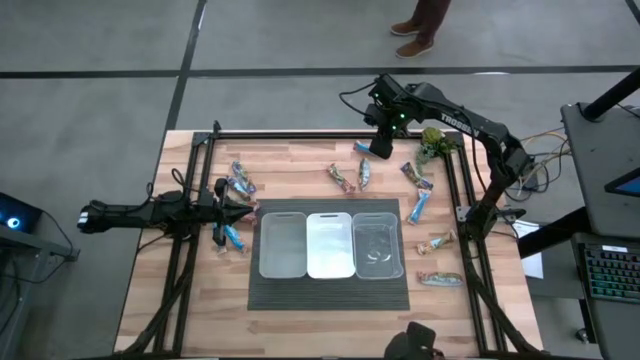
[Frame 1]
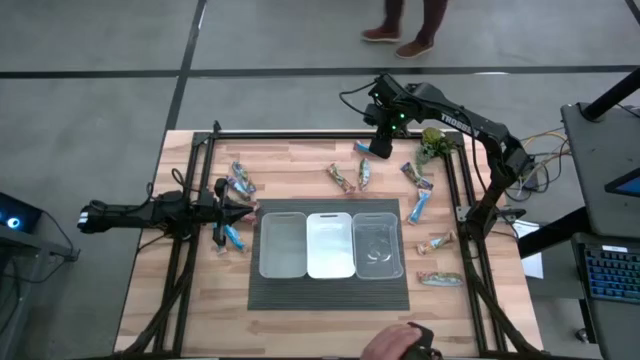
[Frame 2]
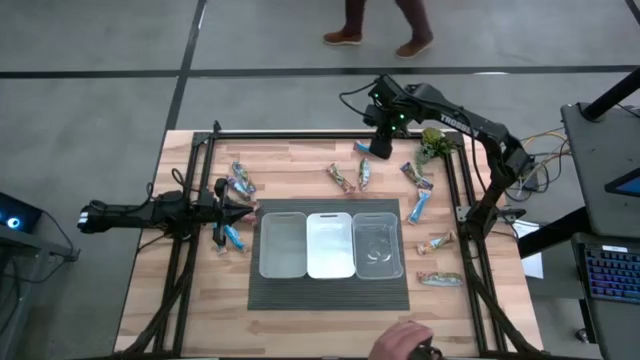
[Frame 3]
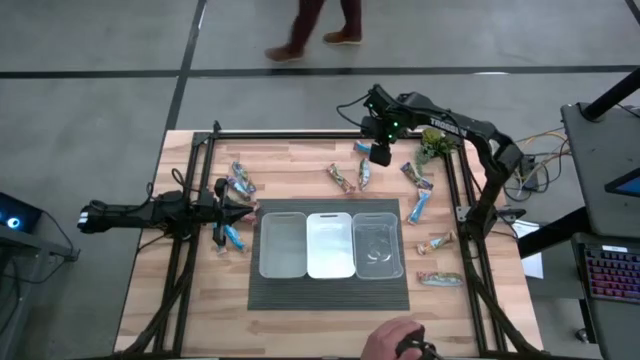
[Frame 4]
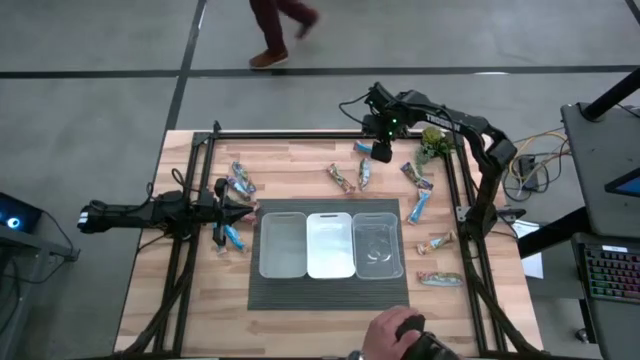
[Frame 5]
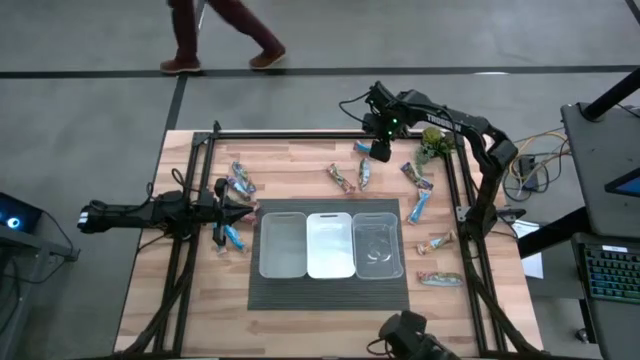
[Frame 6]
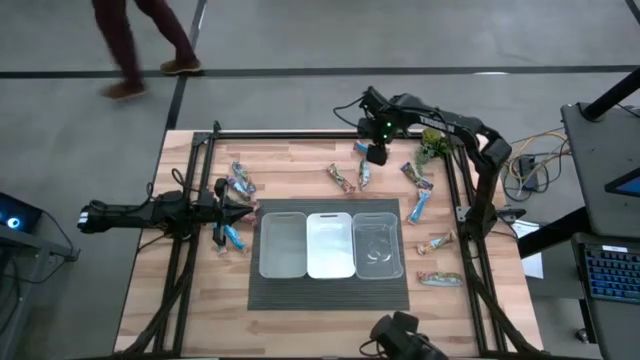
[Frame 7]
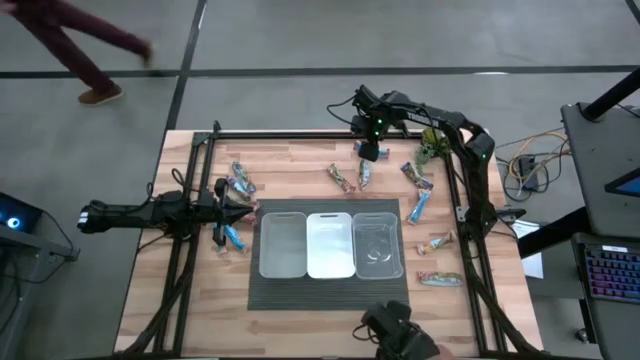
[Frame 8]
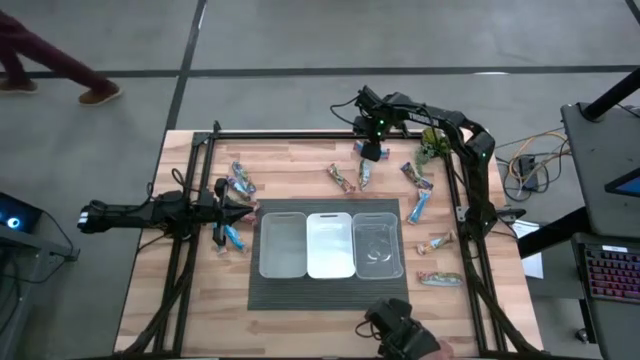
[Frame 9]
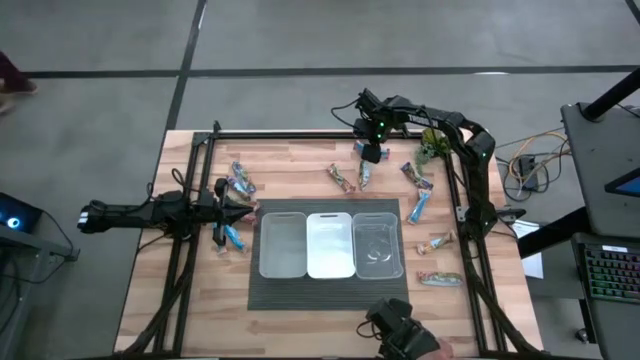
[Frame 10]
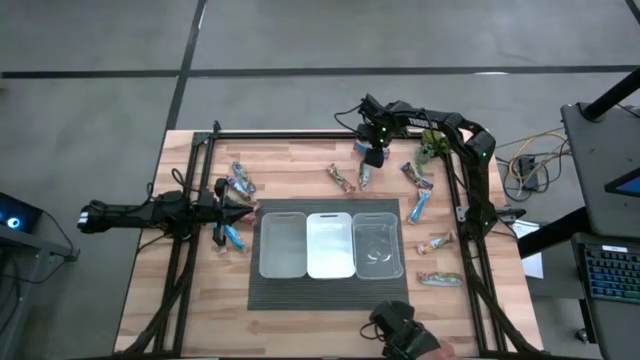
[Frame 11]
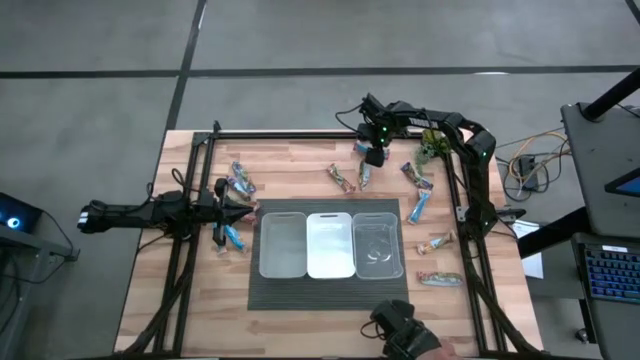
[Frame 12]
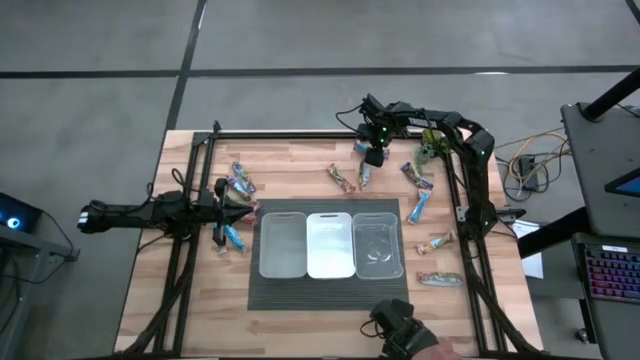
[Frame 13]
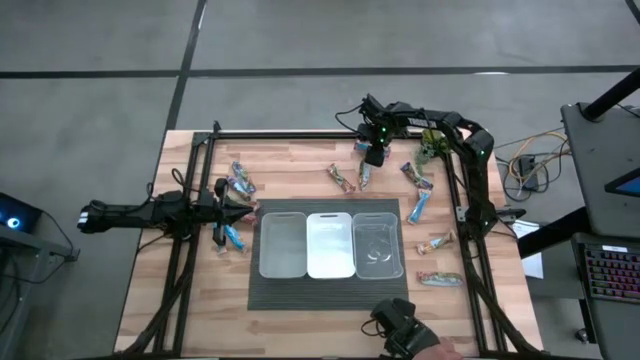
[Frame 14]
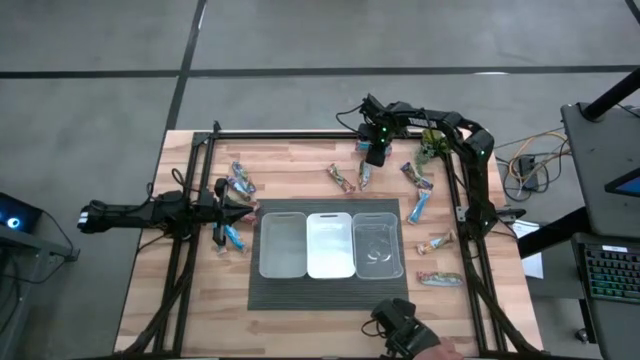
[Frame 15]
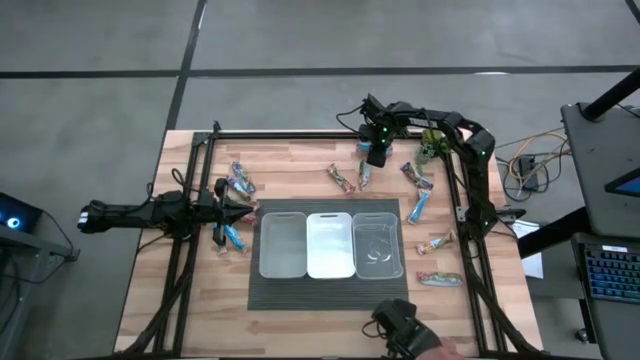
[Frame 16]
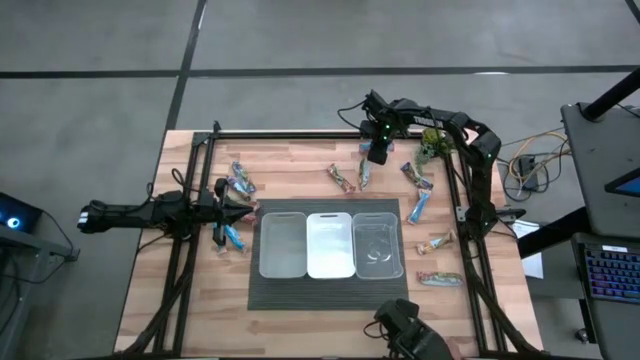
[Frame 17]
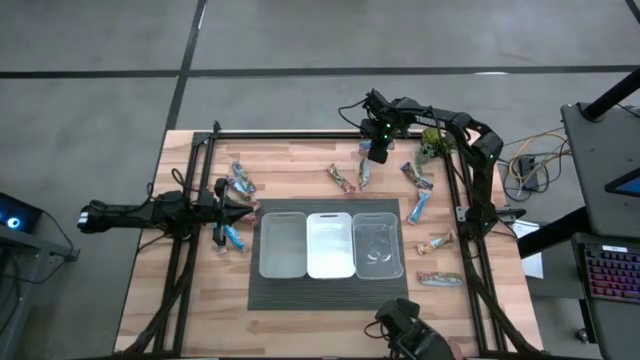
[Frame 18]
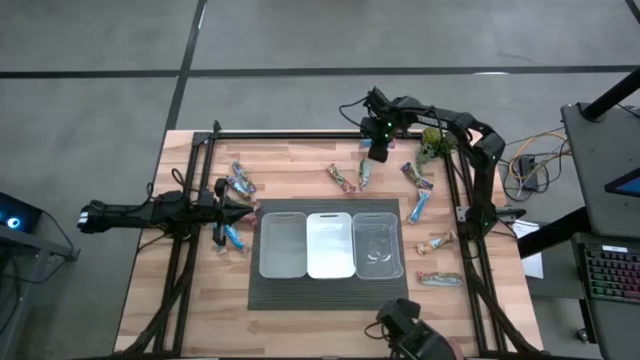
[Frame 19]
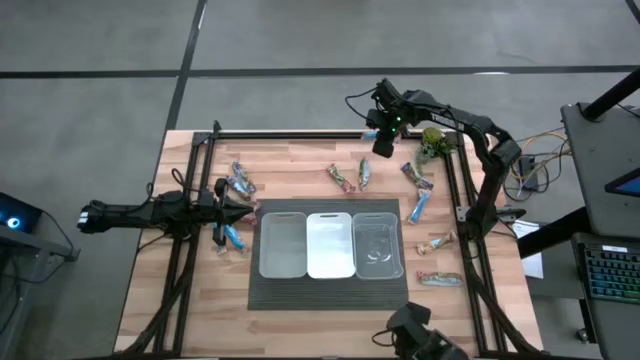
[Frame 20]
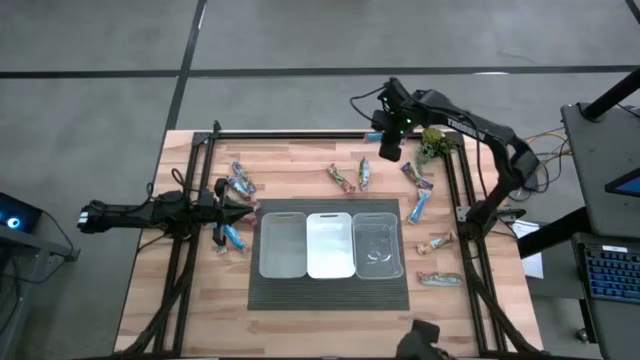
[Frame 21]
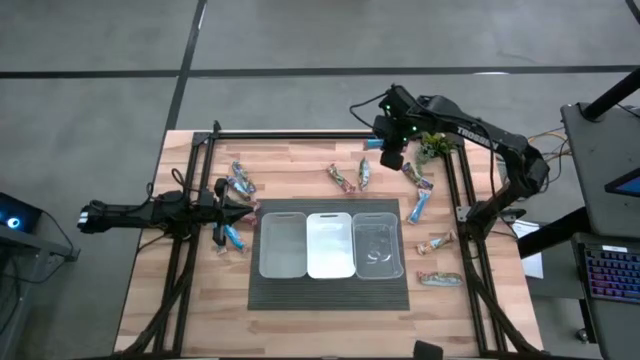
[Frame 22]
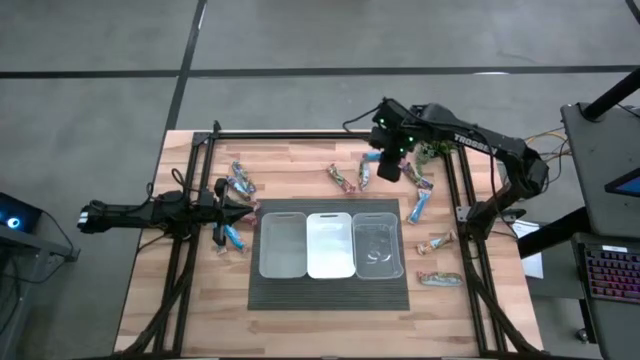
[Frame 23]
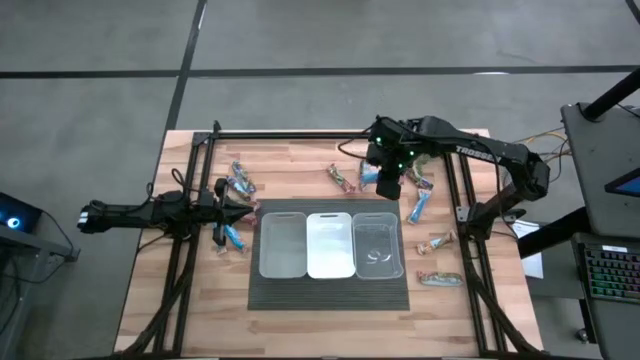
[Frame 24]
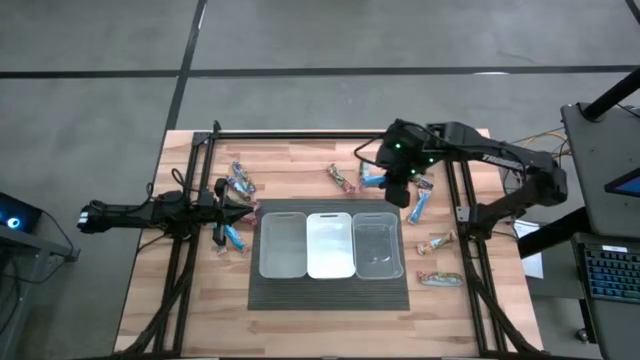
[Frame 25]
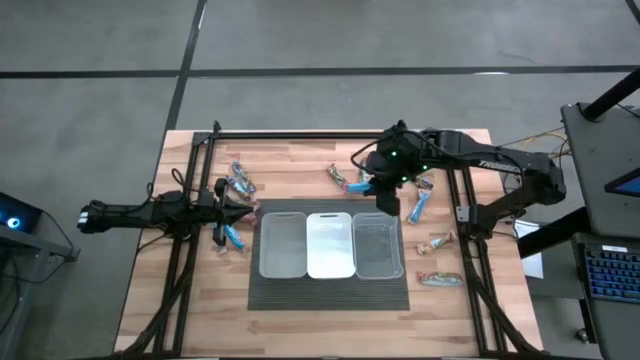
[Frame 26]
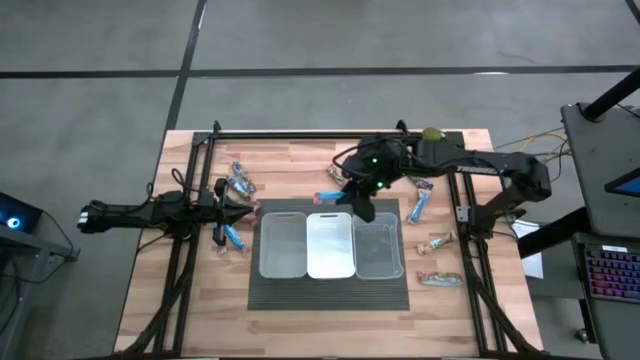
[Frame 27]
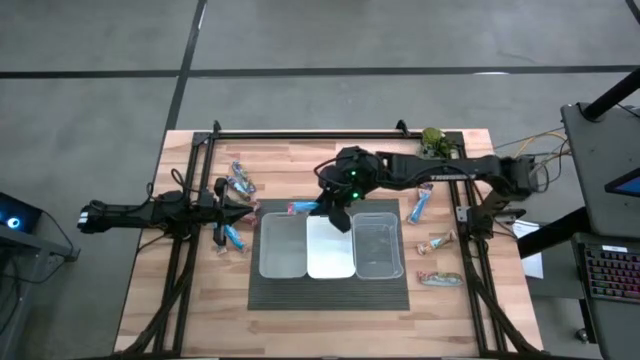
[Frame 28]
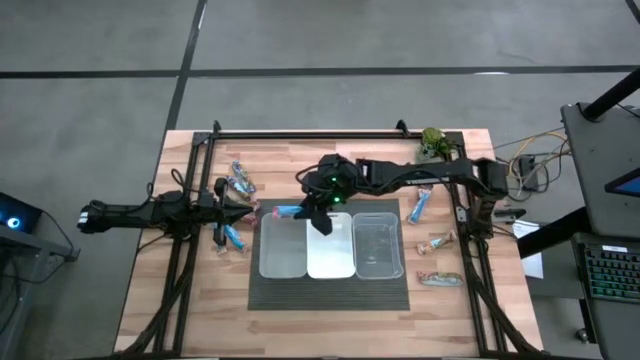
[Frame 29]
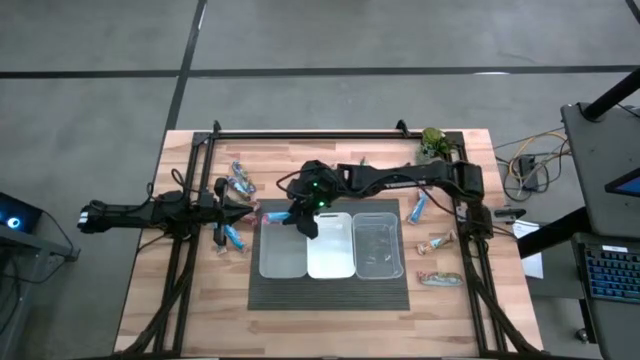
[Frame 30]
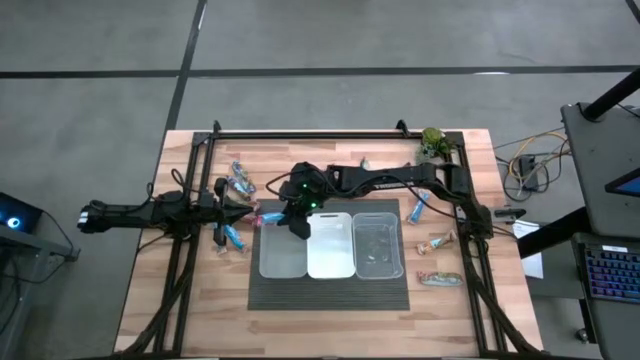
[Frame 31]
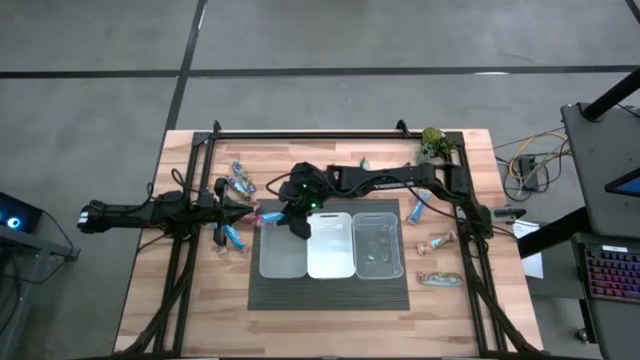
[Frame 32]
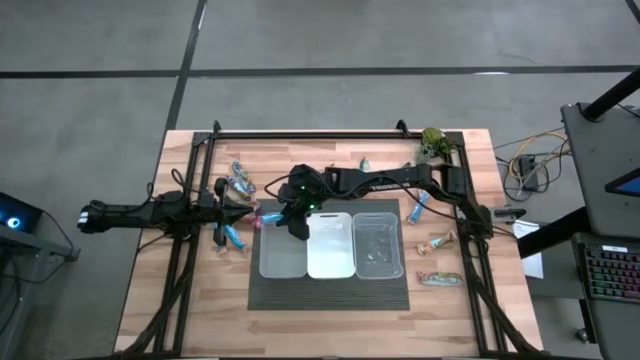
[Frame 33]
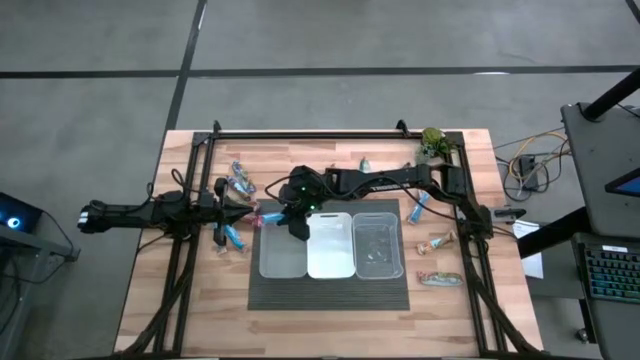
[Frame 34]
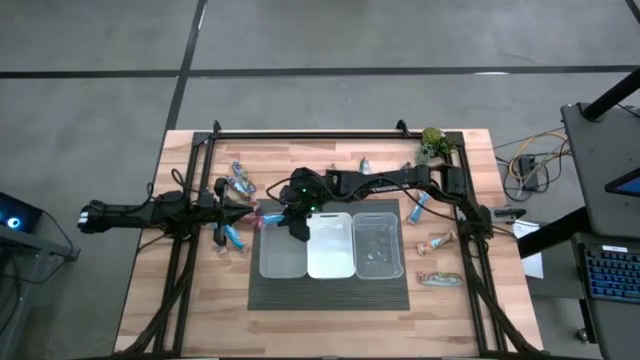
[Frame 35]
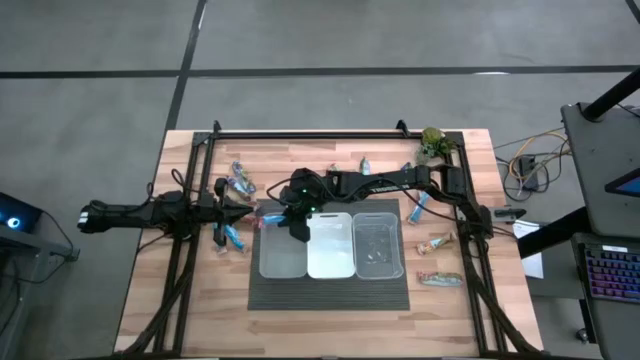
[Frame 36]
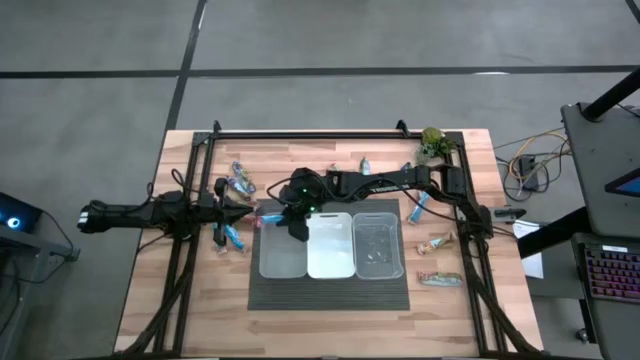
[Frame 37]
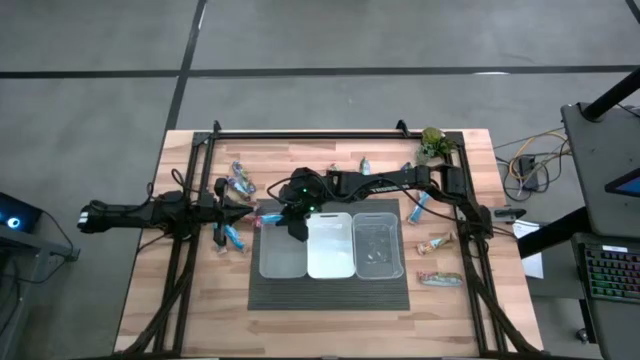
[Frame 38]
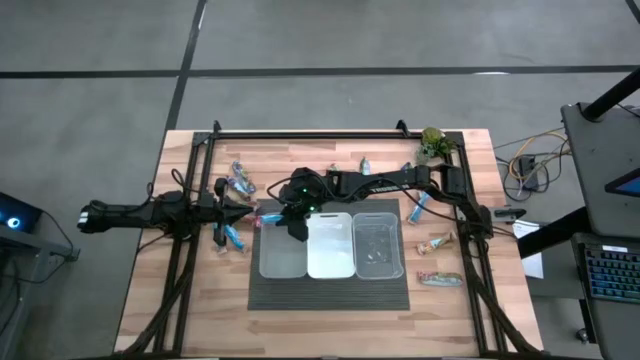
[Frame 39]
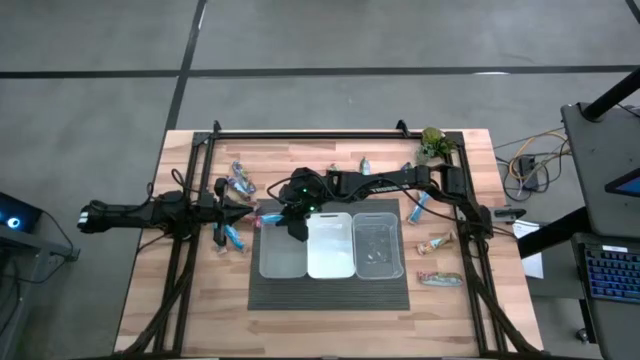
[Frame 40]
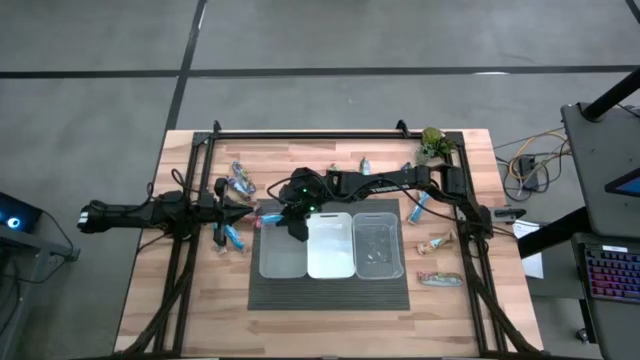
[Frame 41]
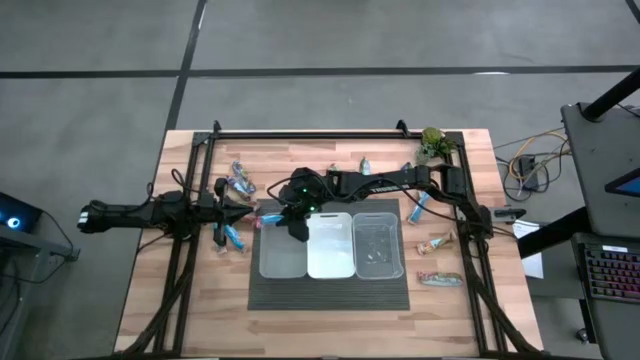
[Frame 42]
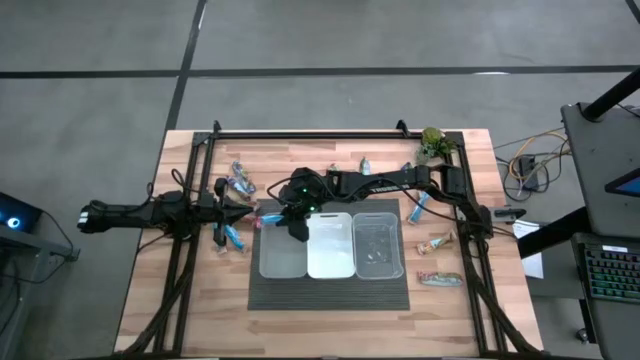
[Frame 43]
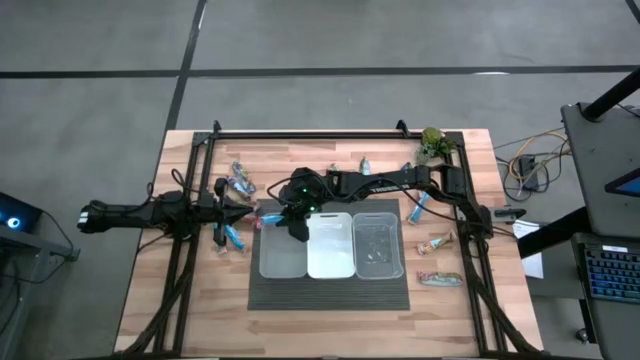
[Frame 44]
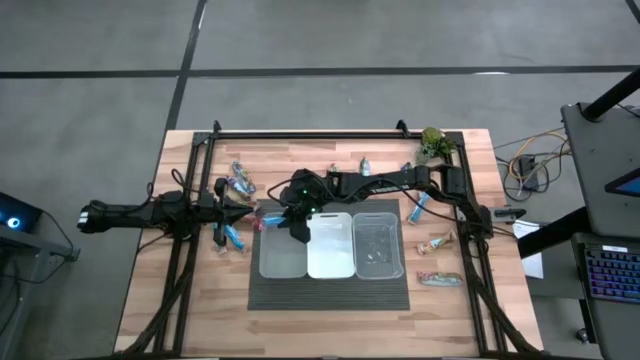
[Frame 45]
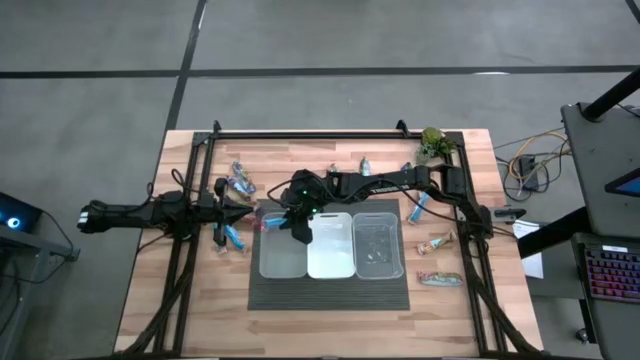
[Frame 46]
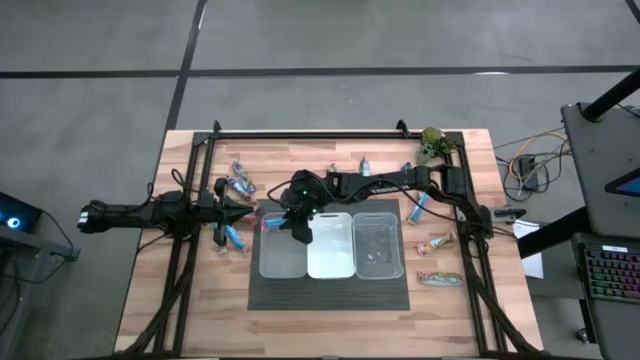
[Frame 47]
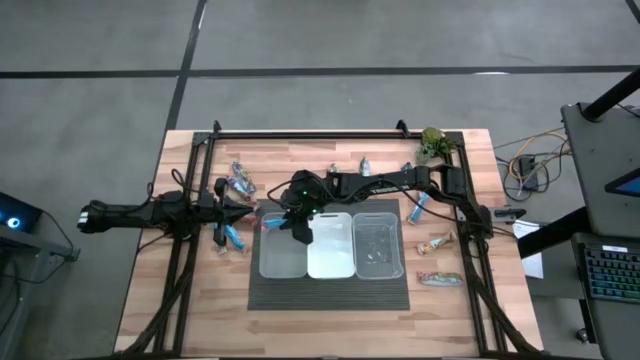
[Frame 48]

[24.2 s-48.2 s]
Task: Pick and place Granola Bars by type
Put the red granola bar into the gray bin
